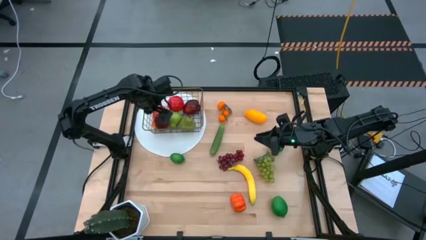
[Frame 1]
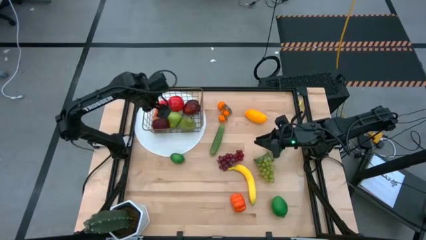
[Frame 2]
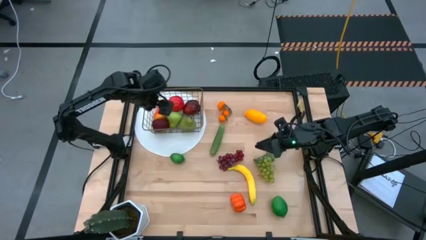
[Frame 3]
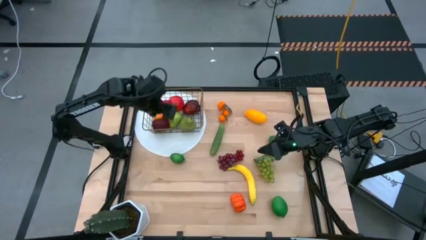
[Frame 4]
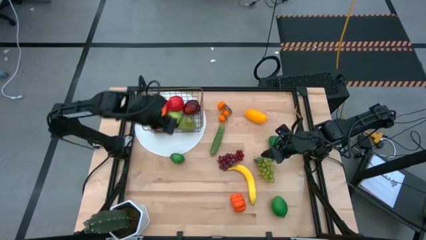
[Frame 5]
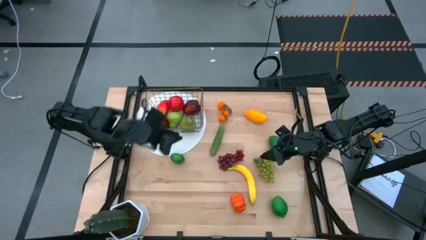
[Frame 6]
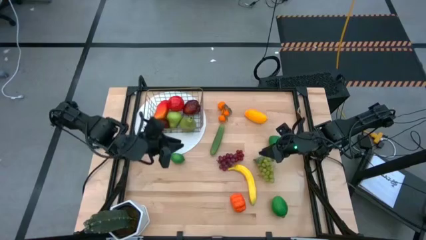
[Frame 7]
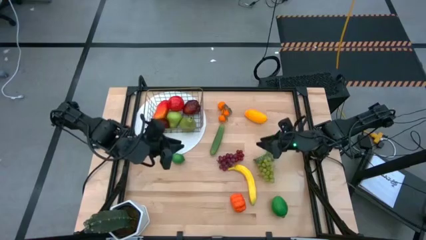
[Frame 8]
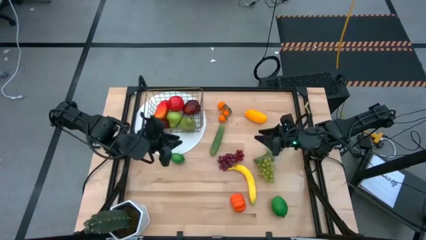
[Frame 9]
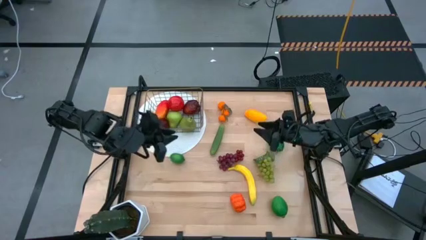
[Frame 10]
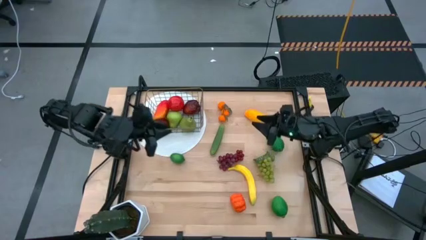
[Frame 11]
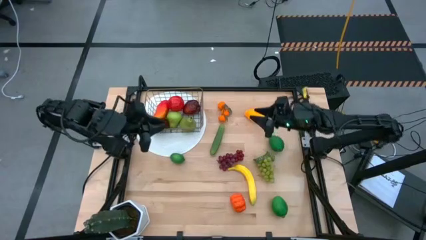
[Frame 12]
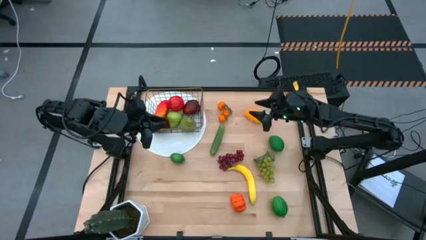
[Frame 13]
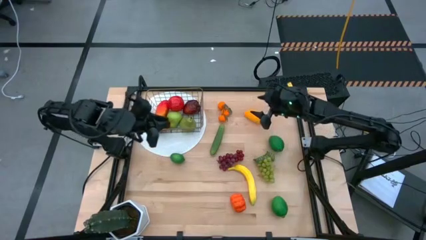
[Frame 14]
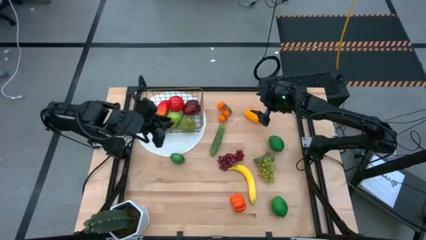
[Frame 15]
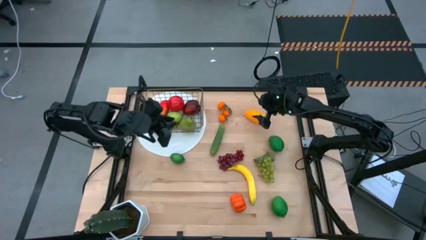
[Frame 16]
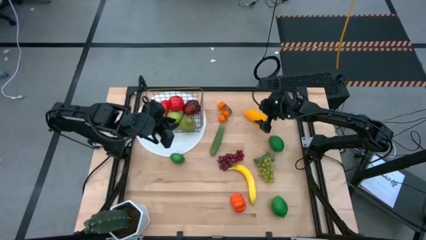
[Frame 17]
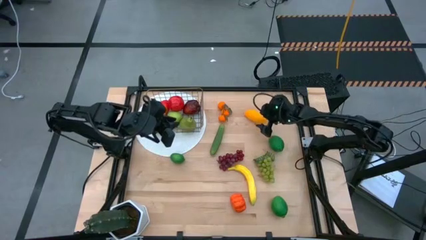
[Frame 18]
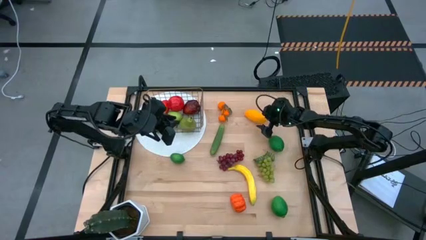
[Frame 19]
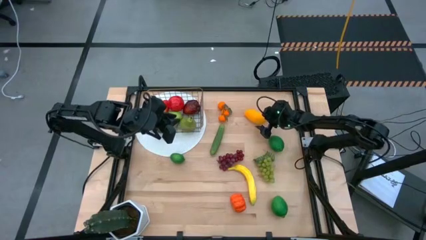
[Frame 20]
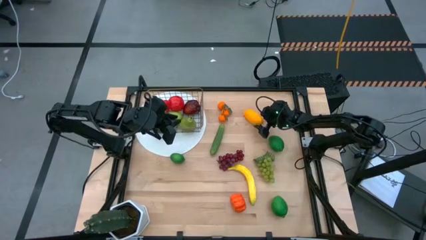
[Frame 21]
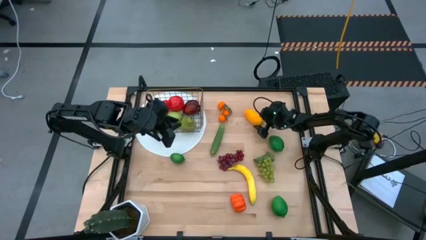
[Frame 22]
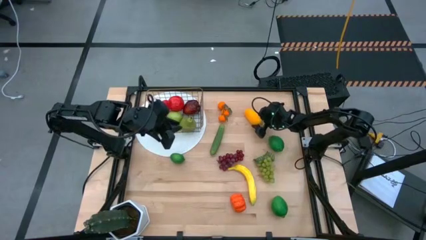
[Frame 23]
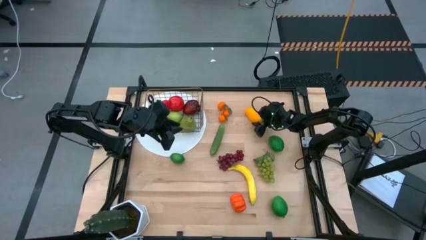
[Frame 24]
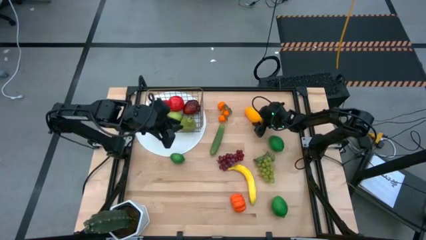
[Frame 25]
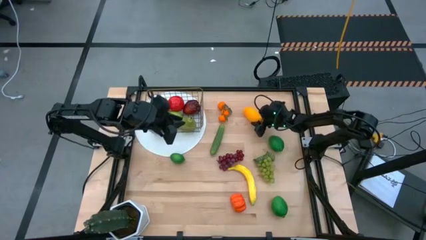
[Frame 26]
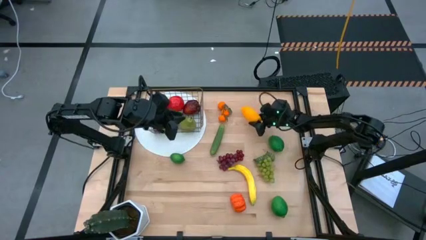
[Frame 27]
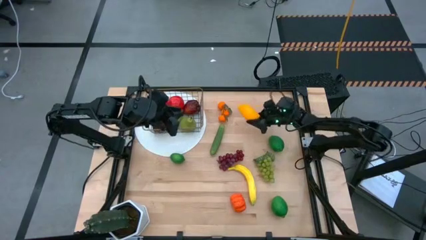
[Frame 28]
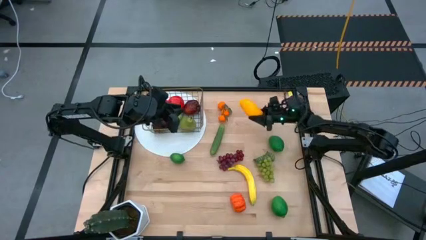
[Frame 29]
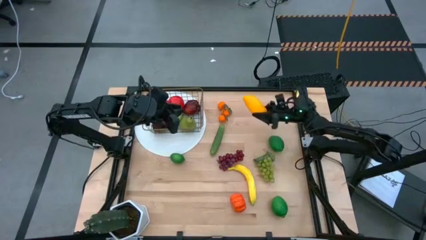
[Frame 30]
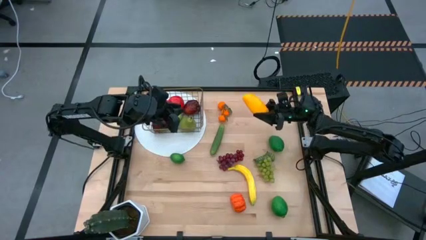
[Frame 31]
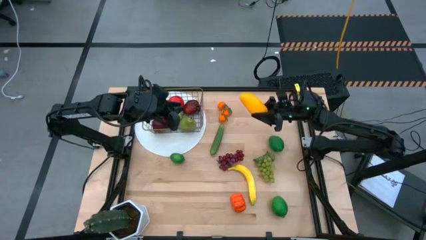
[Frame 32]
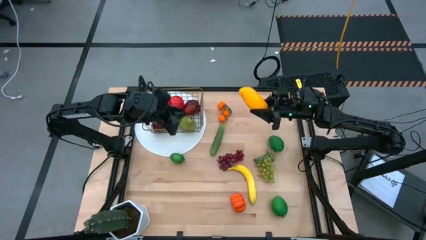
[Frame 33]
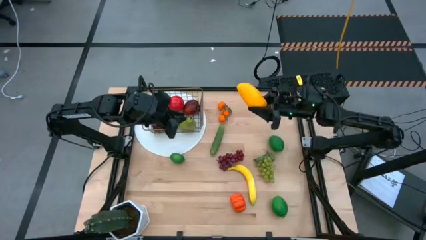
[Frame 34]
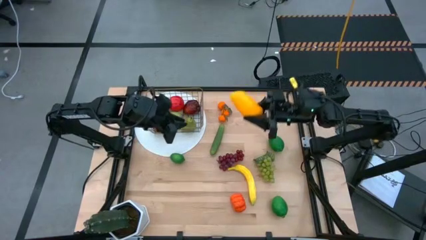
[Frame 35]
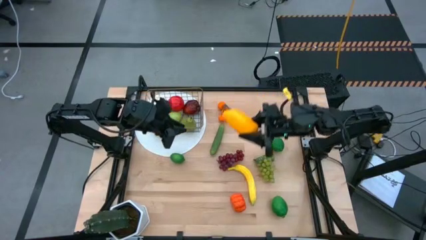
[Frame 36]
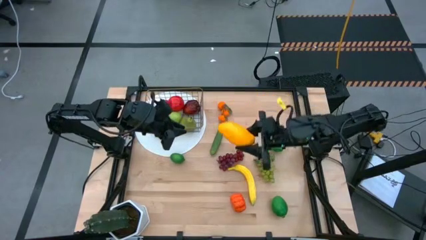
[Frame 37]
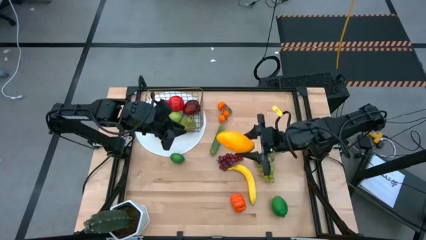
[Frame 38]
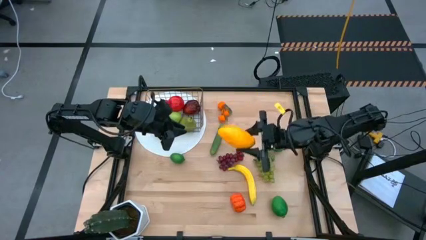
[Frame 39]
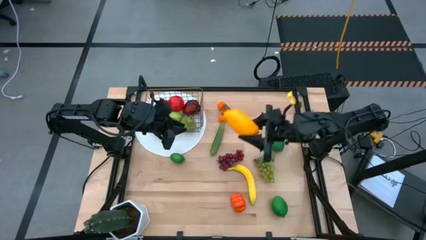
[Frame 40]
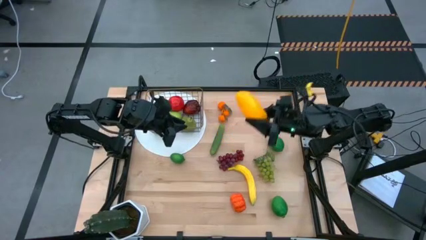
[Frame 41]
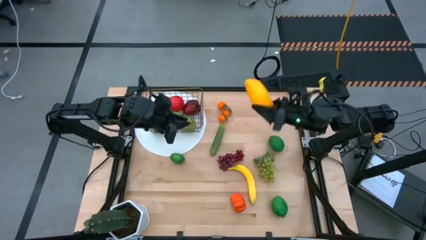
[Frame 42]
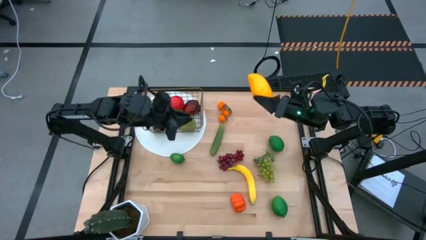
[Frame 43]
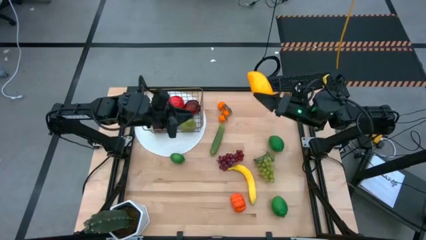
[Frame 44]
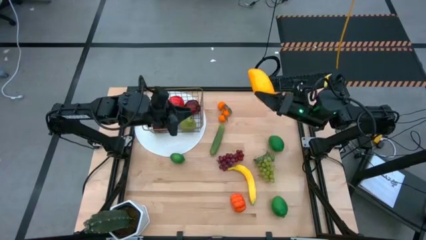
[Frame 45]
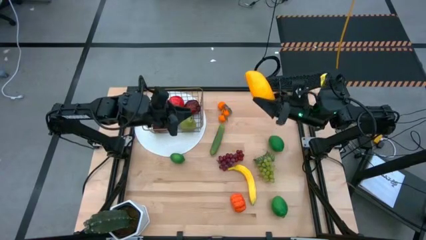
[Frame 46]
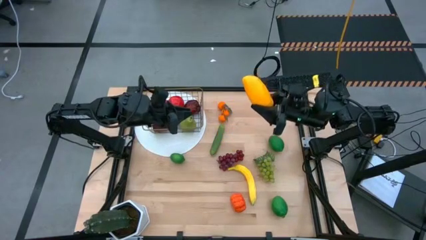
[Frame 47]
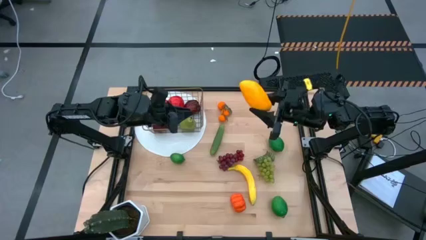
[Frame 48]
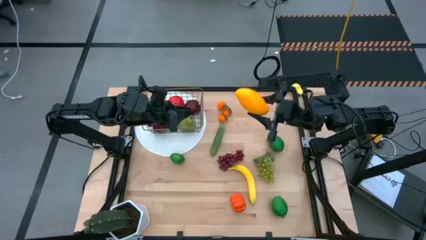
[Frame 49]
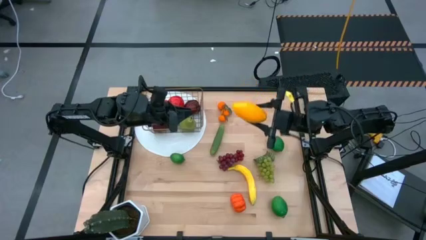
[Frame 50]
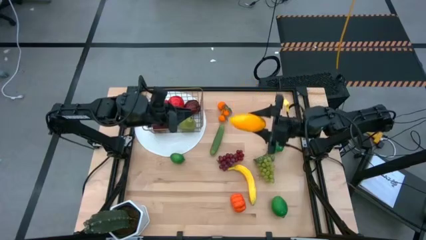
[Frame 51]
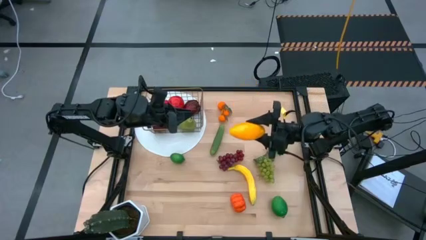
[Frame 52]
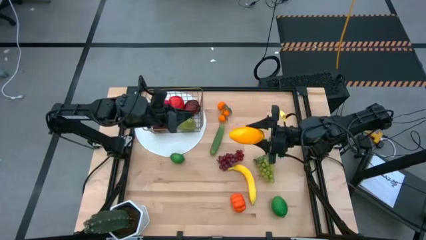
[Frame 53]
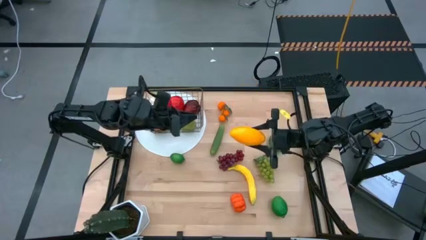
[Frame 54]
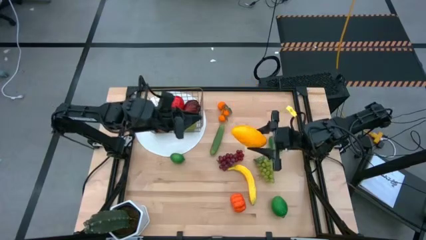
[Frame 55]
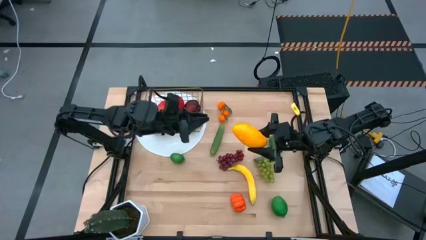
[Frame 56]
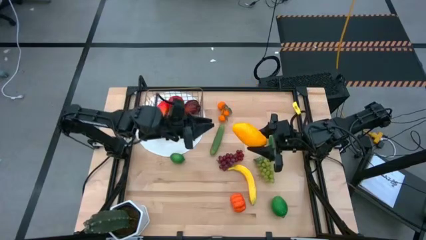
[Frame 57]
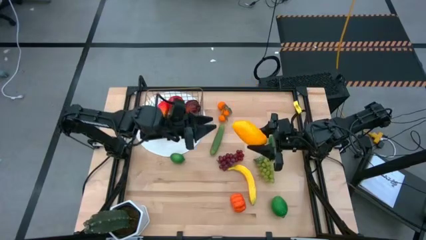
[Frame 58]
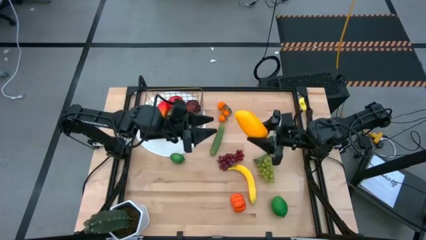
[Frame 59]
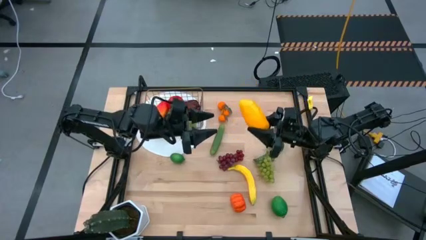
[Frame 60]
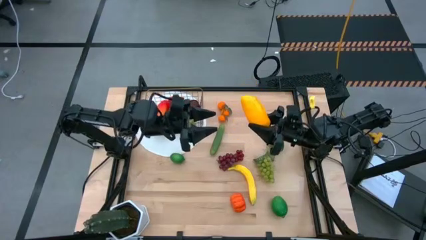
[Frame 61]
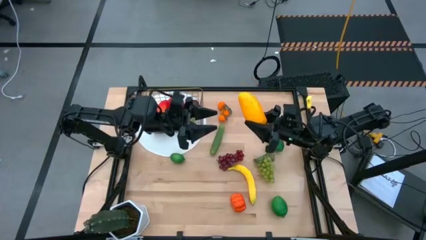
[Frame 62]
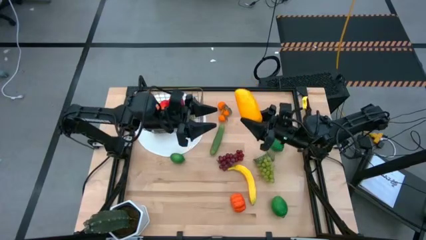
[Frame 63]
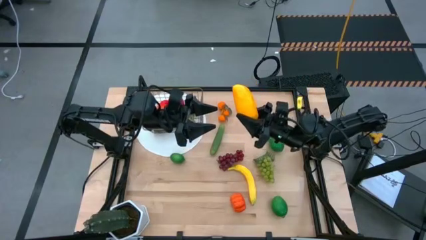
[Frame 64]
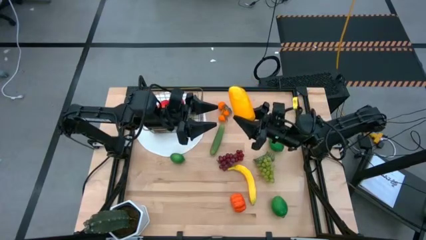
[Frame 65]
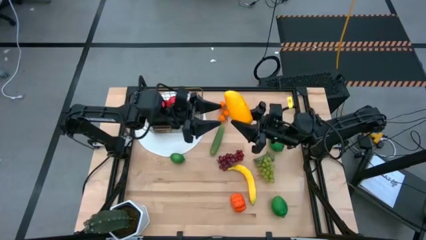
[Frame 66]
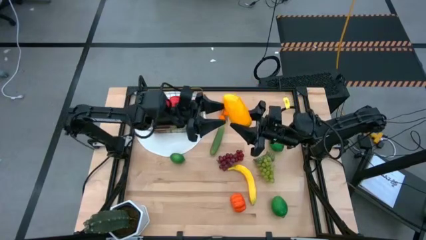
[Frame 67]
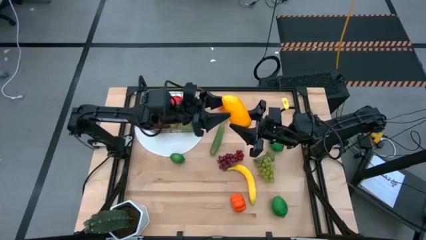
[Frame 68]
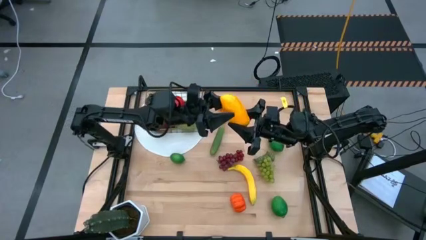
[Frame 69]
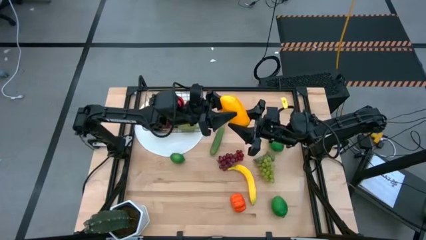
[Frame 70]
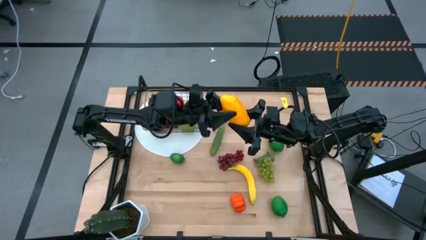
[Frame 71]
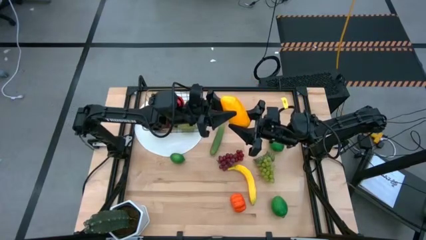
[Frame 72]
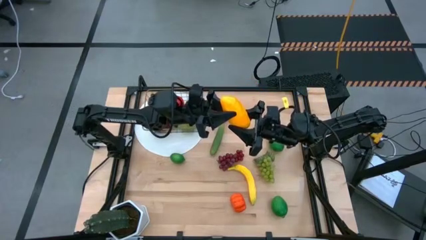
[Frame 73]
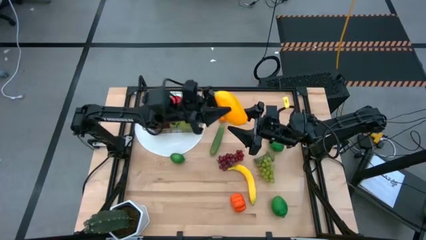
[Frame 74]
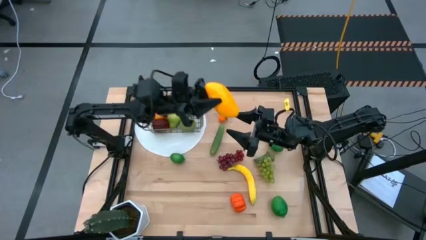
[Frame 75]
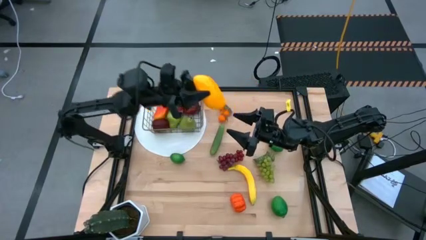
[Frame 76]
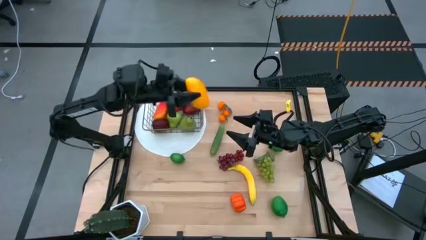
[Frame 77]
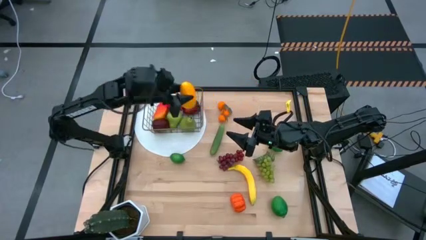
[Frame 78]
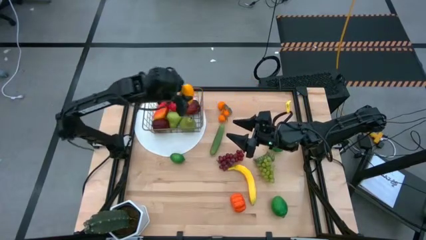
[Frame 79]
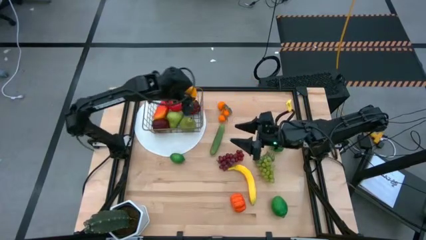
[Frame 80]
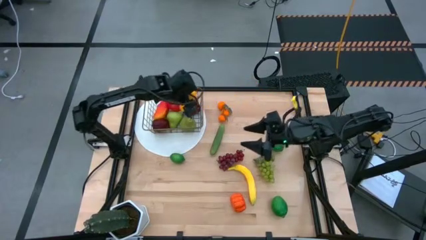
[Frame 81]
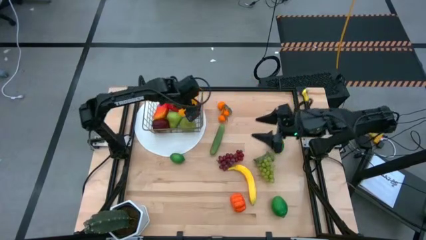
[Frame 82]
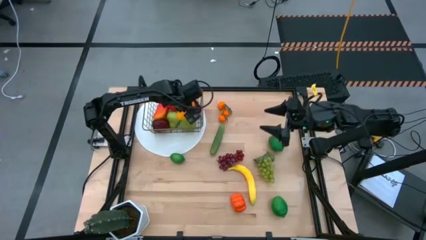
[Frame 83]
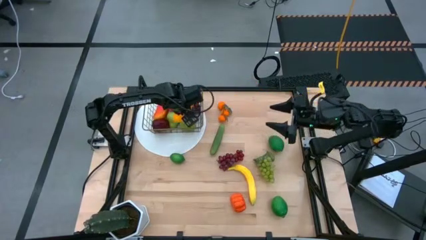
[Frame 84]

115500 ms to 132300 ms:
Task: Build produce basket
Put the mango into the wired basket
